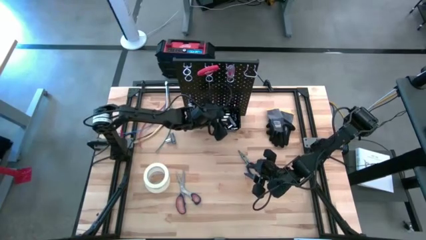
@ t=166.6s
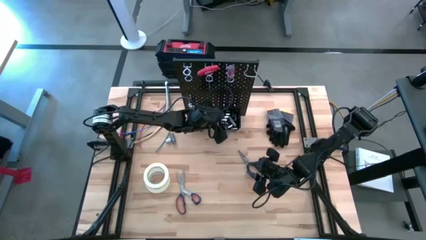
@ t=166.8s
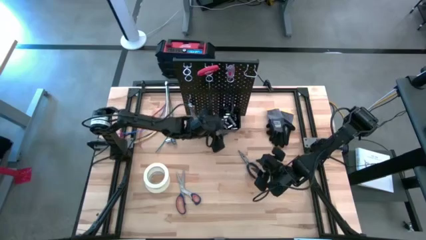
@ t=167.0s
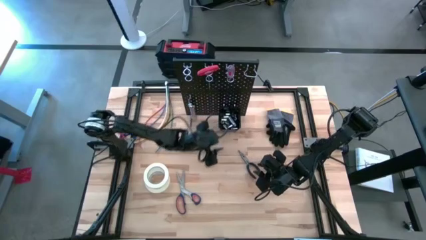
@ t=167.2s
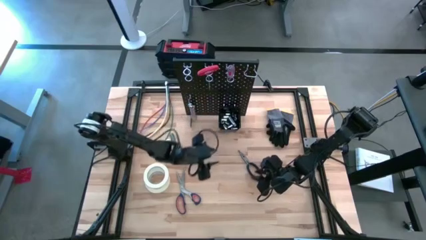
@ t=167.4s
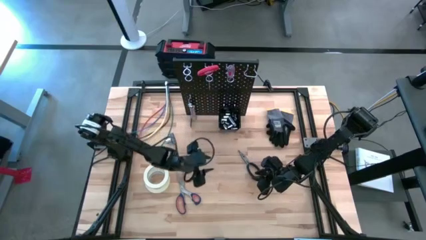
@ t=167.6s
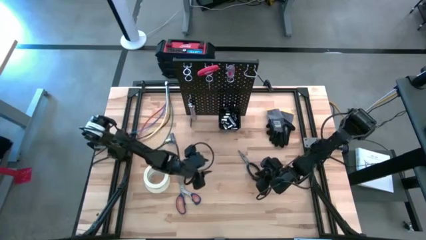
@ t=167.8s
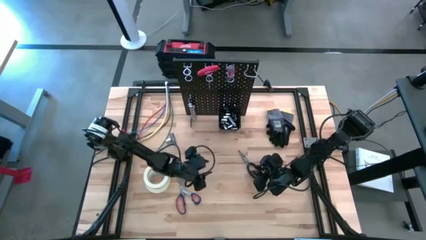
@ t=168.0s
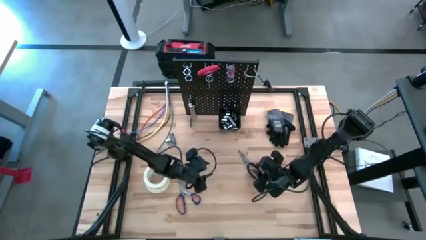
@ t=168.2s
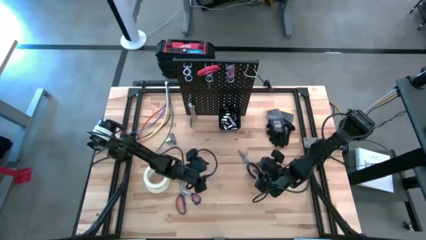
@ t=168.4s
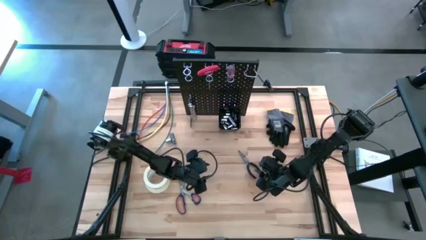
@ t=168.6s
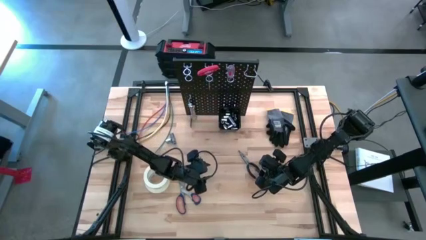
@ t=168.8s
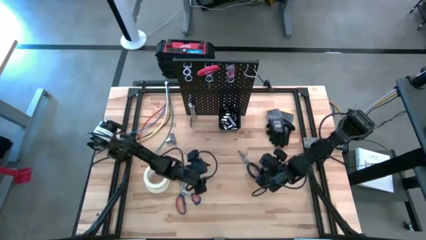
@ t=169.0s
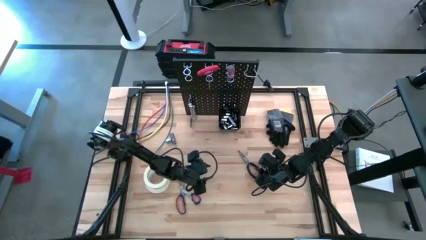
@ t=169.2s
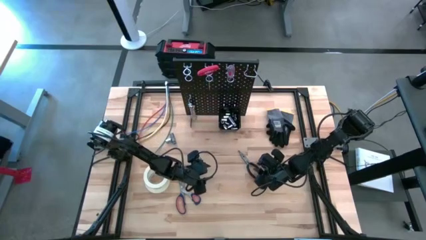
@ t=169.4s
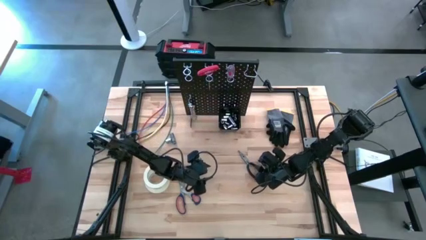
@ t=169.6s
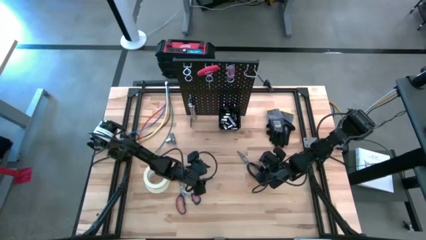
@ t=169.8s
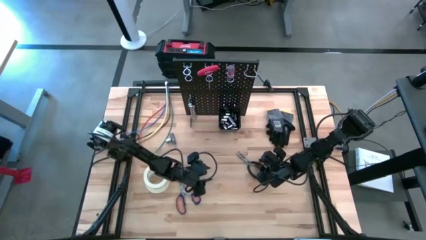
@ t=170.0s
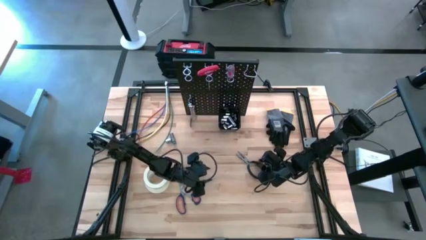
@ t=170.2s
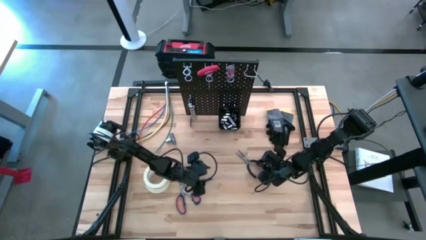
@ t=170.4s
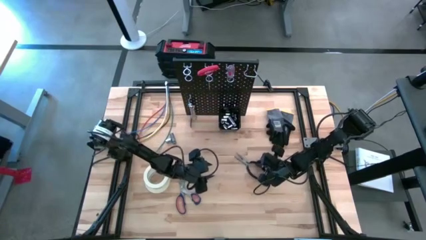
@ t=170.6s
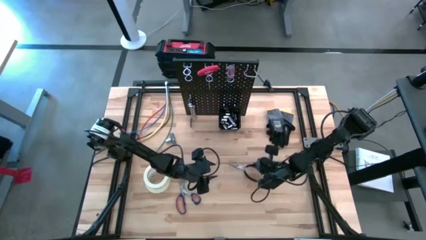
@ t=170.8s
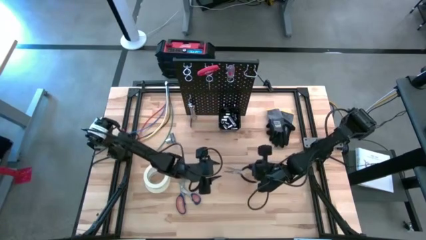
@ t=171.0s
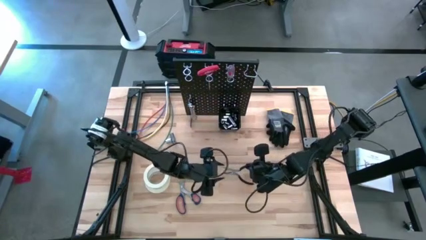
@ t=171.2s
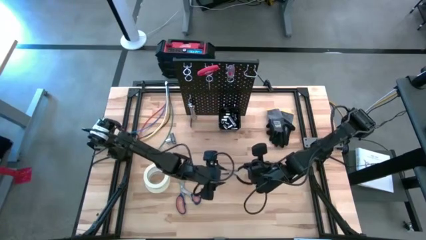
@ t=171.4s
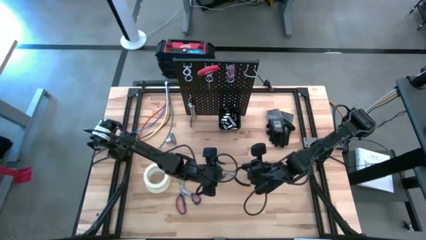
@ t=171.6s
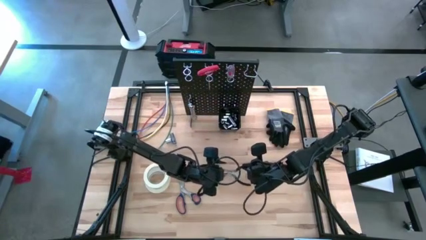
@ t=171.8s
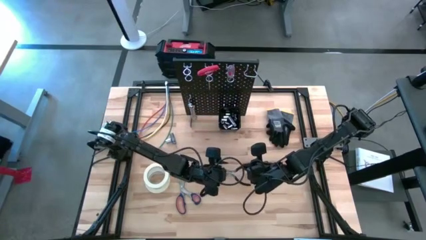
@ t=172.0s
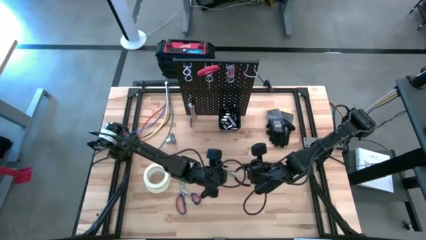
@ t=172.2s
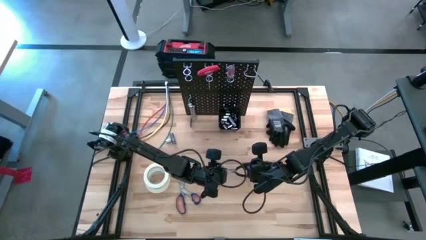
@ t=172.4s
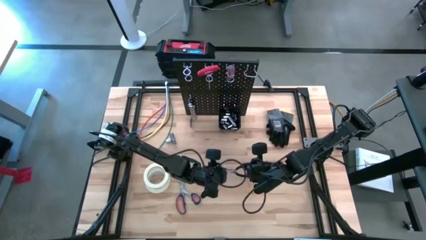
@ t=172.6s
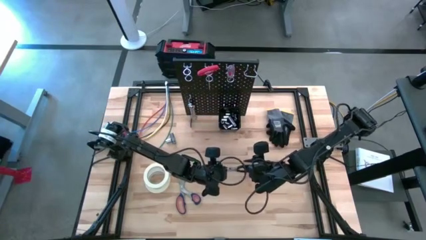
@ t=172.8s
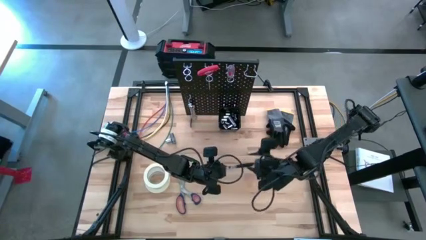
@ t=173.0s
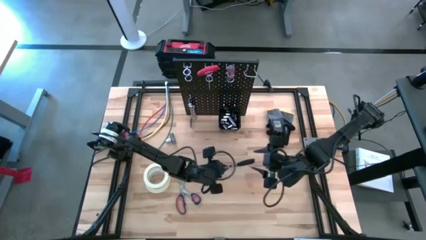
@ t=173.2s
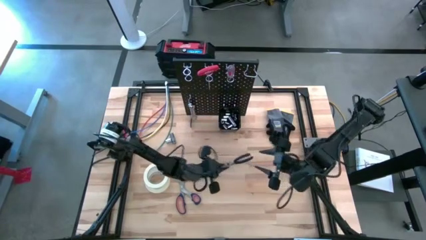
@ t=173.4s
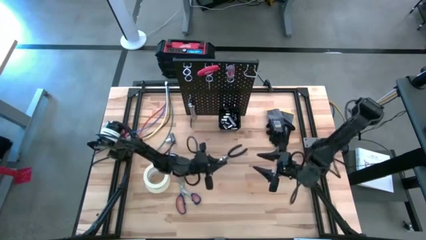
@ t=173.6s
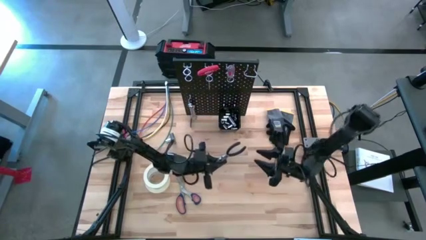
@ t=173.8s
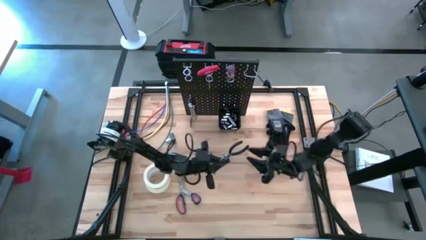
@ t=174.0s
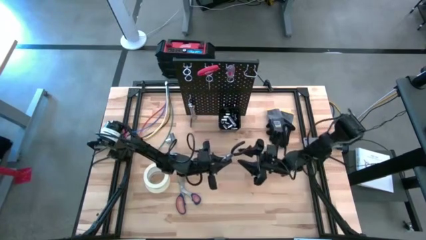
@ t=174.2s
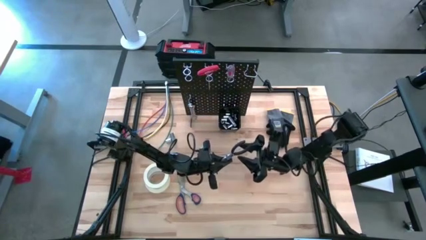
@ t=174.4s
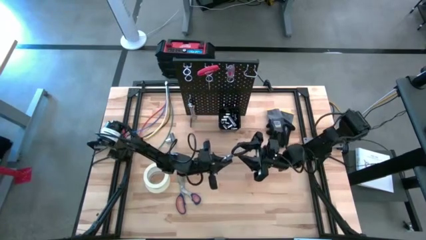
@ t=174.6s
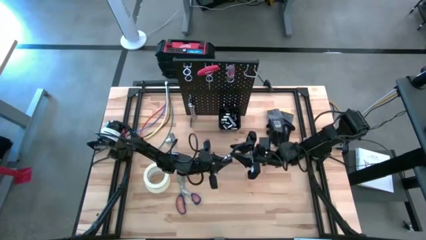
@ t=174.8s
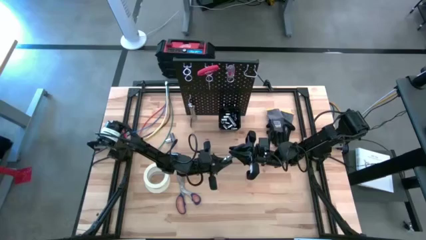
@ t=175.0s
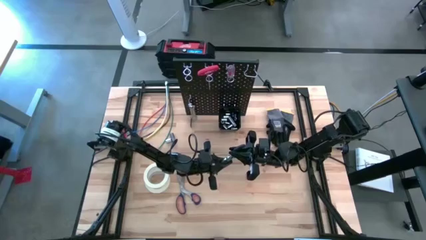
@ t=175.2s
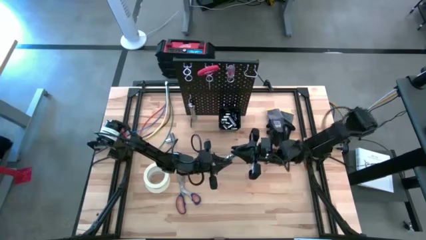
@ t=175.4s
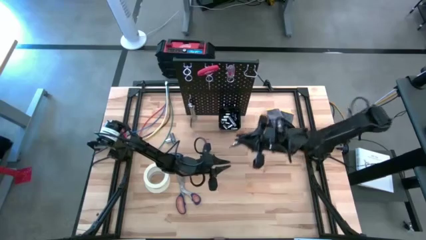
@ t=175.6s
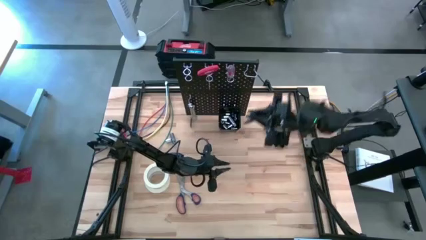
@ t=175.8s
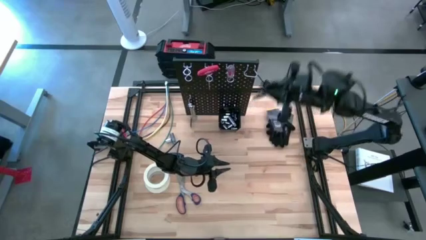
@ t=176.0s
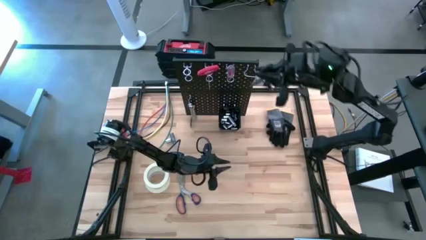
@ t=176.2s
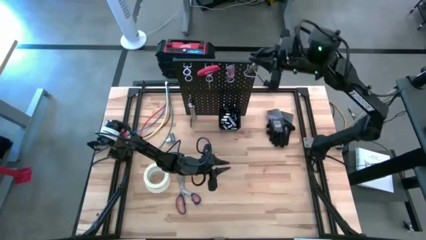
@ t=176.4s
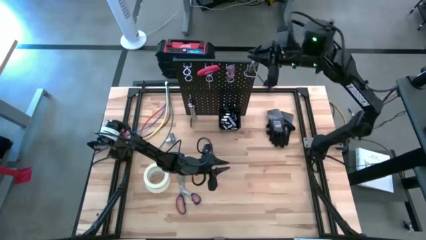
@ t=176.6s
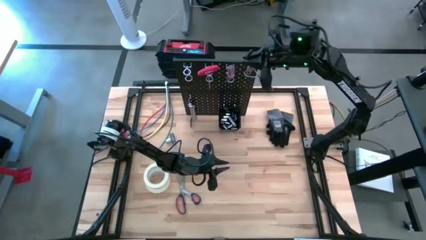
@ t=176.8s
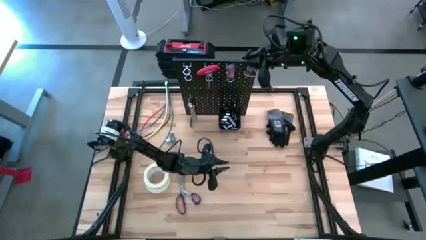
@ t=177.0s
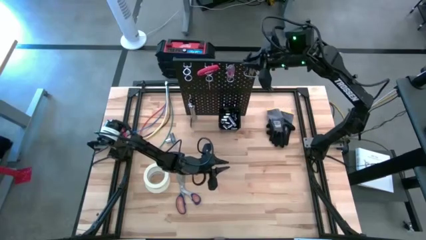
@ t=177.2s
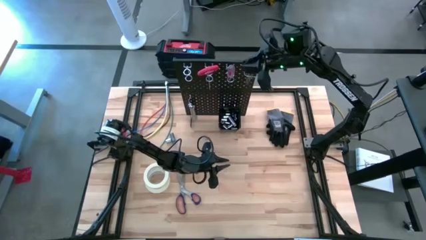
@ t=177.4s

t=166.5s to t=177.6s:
Task: Hang tools onto peg board
Hang the black needle-nose plier on the peg board

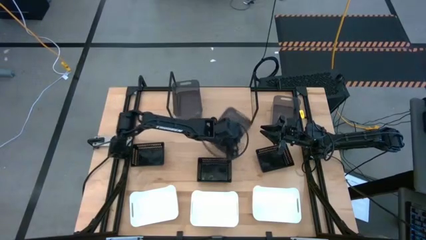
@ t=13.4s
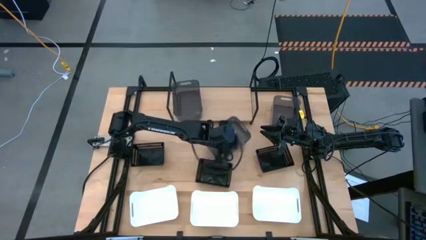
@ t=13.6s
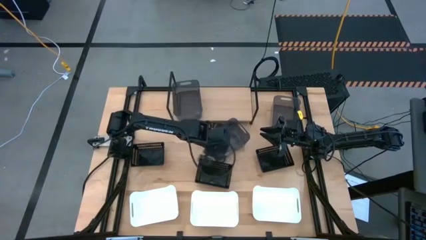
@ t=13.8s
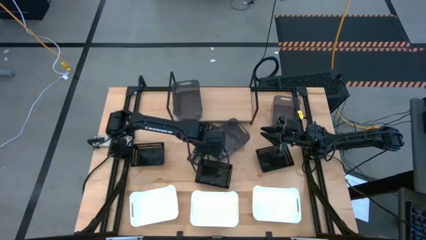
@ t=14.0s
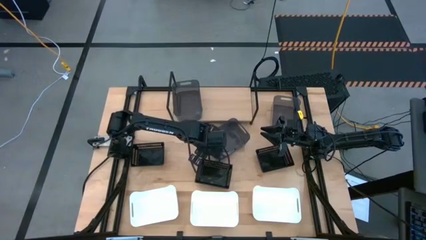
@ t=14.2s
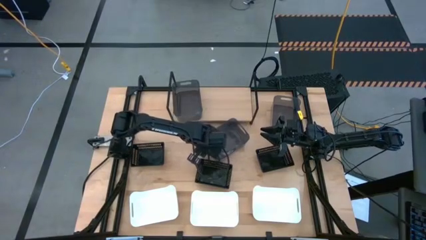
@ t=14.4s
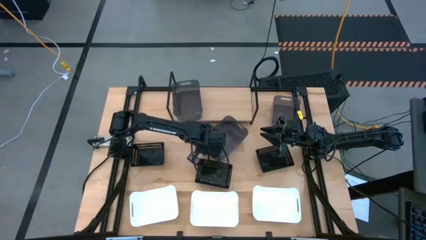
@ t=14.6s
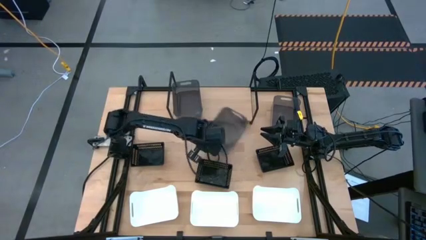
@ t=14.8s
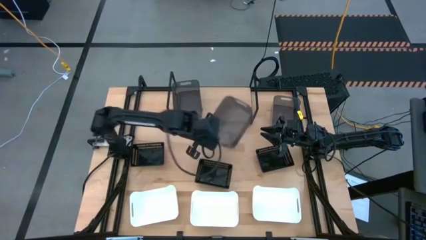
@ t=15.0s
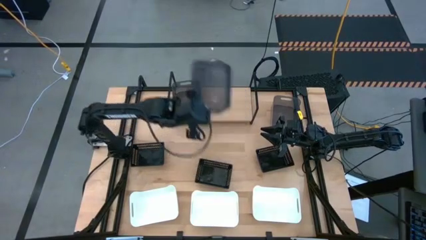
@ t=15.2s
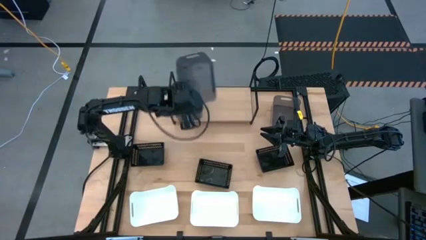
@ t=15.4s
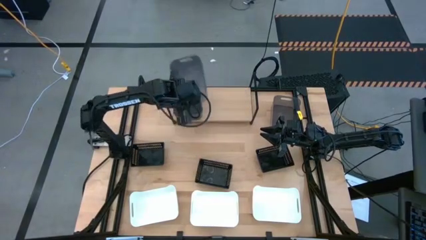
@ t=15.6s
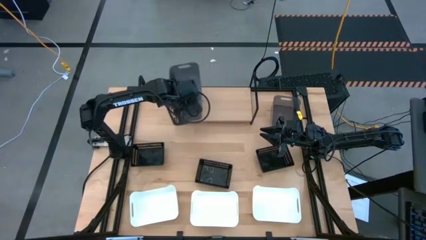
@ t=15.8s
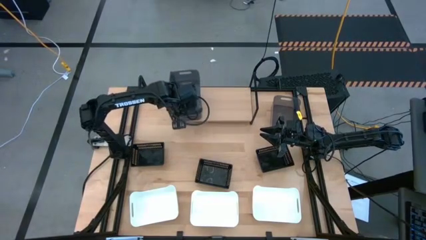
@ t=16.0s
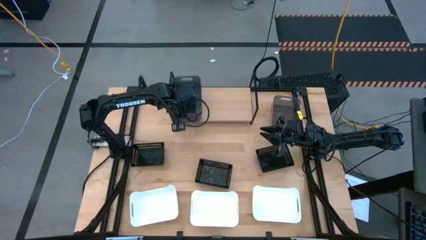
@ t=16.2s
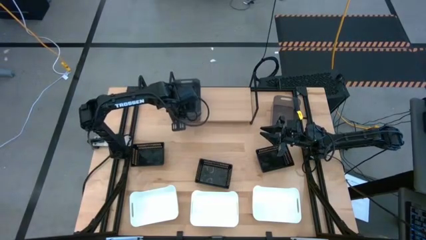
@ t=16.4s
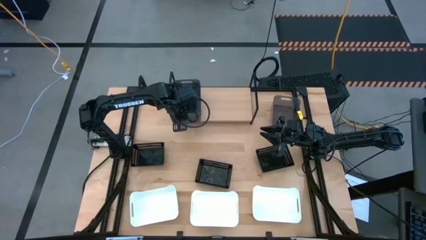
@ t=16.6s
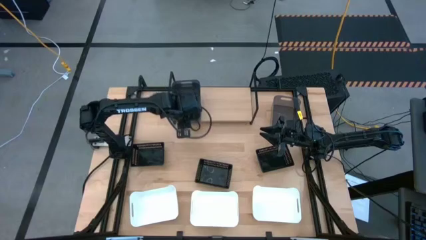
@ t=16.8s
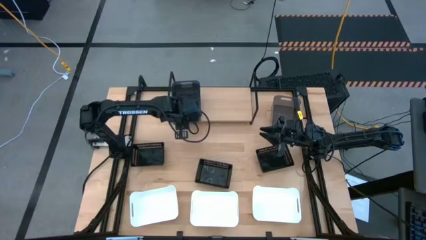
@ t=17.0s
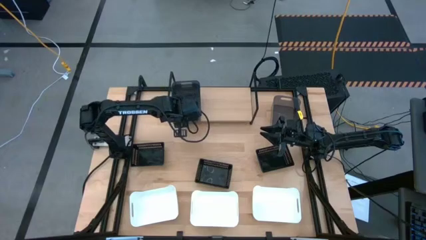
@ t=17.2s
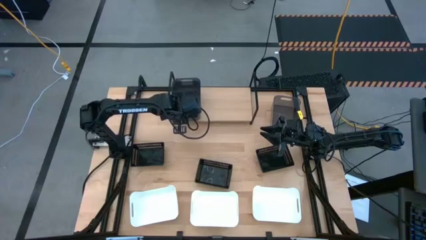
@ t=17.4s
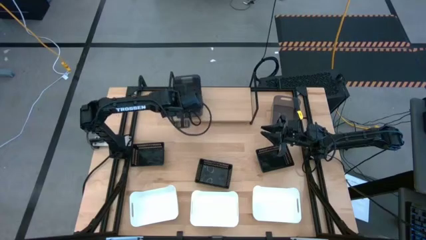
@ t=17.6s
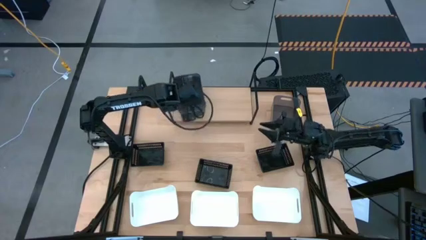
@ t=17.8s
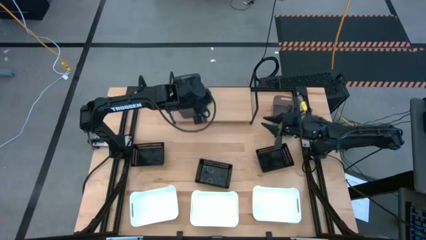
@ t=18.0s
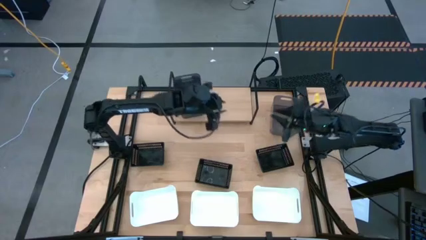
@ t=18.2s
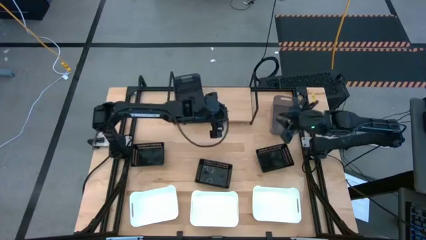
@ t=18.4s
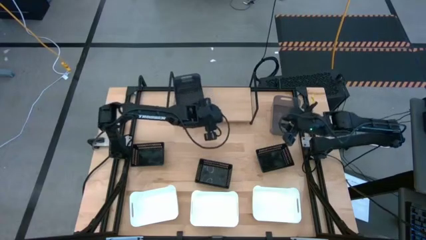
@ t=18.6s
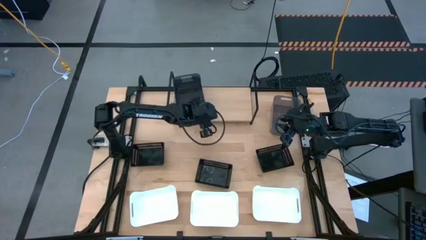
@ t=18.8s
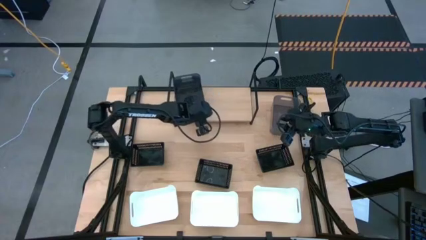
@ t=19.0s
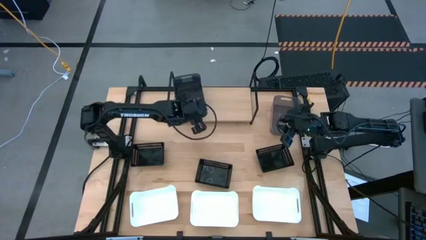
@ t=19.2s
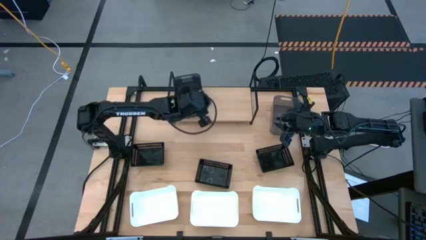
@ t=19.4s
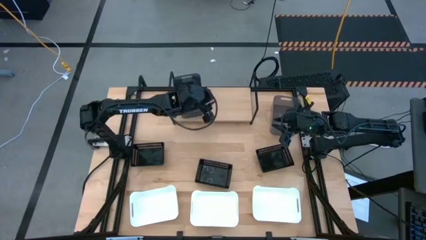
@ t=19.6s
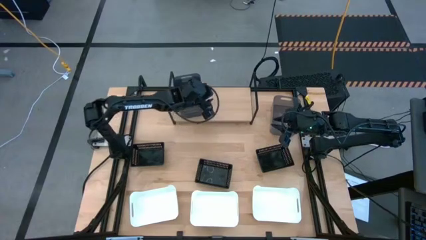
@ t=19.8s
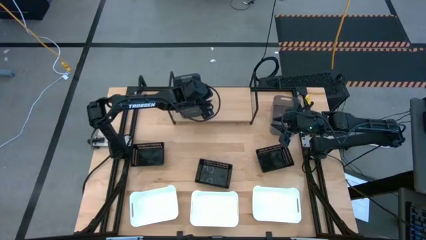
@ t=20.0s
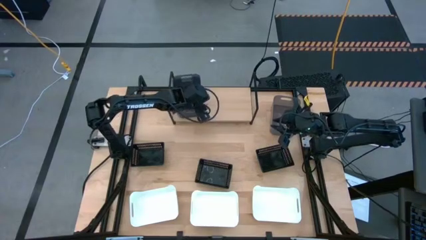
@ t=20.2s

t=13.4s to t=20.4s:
Task: Stack baskets on shelf by color
Stack the left gray bin on top of the gray bin
